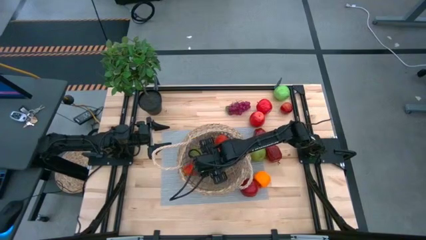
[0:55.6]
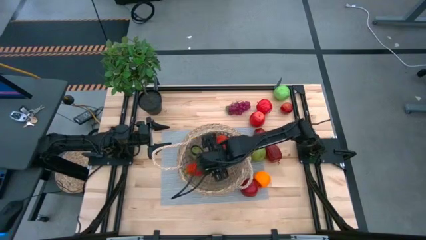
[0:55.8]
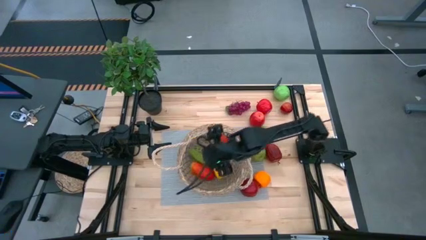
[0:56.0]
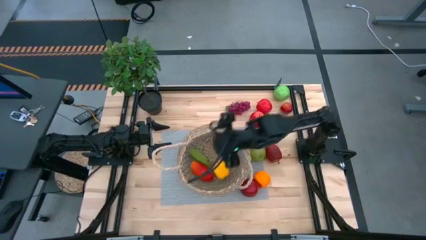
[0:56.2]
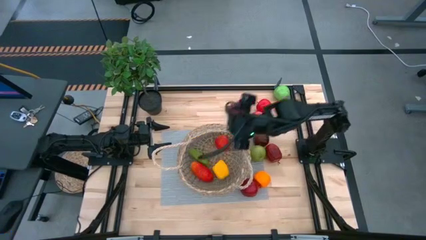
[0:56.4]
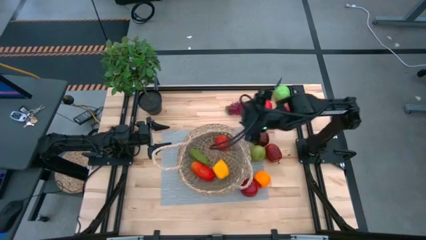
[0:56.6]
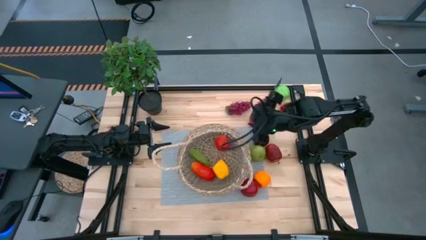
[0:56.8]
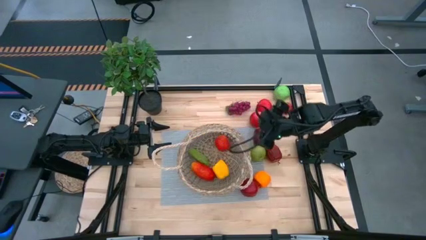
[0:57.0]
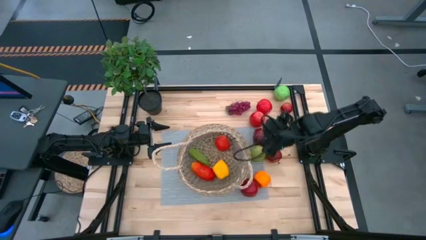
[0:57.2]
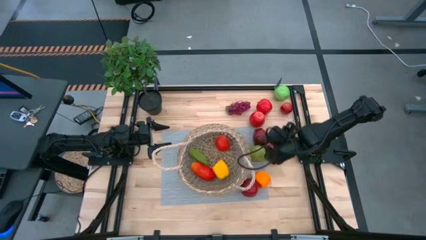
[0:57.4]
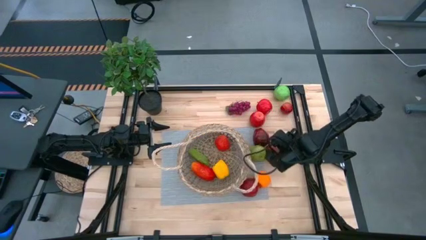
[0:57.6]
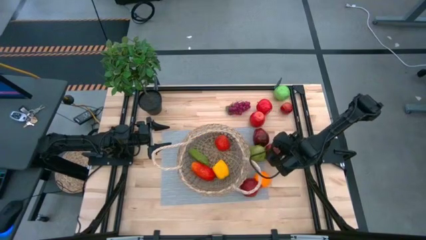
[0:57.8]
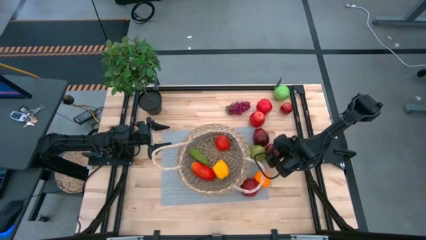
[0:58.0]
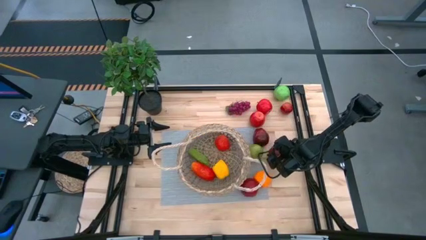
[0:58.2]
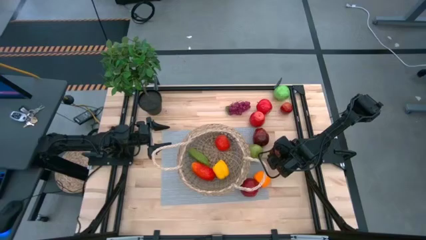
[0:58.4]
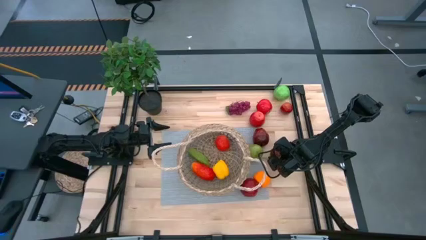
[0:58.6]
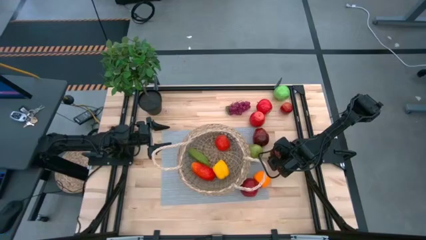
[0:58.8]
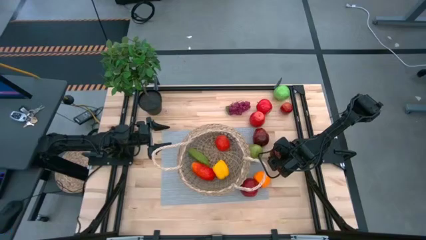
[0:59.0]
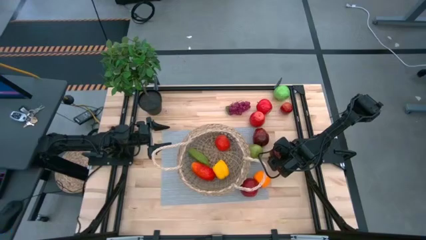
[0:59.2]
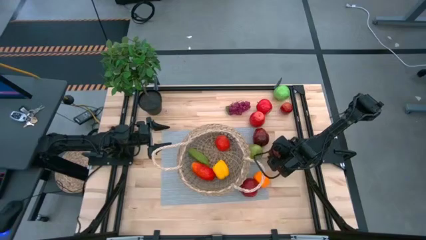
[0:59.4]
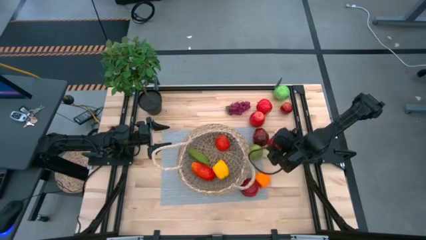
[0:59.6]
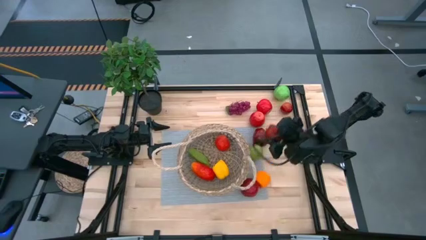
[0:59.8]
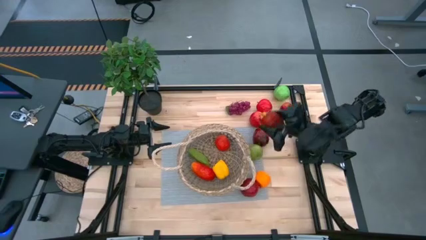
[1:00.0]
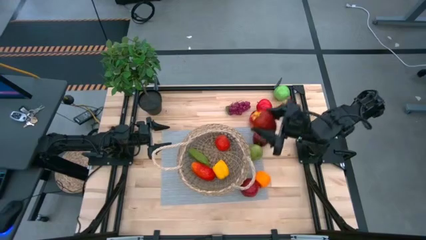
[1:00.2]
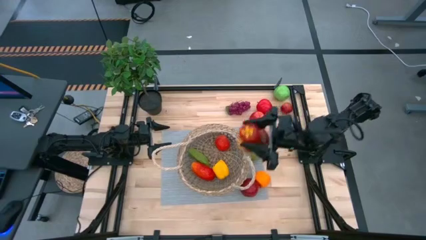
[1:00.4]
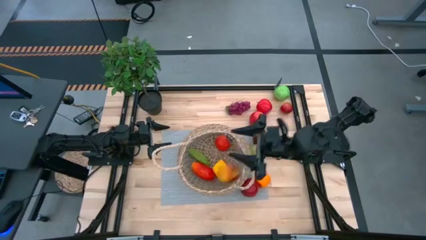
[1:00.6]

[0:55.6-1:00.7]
Task: Build produce basket
Put the bottom dark red apple into the basket

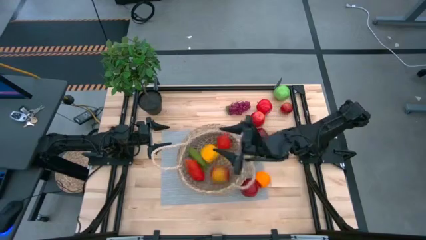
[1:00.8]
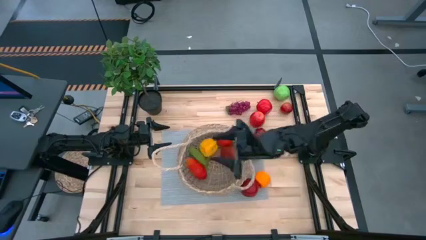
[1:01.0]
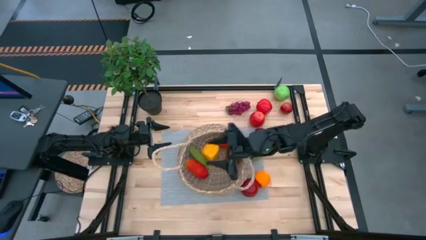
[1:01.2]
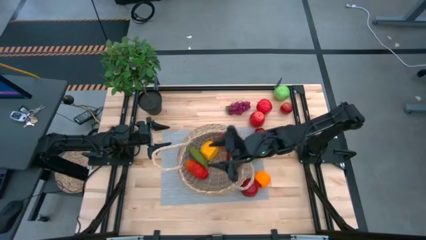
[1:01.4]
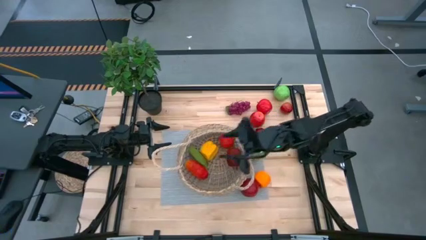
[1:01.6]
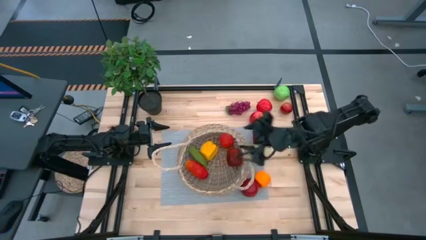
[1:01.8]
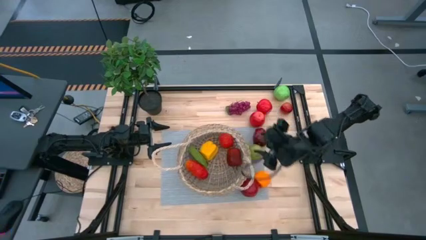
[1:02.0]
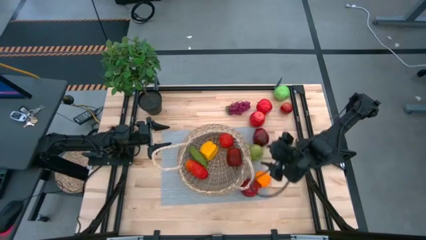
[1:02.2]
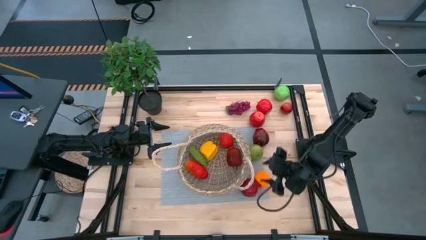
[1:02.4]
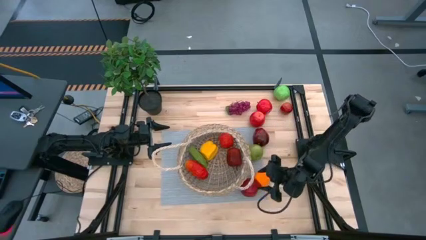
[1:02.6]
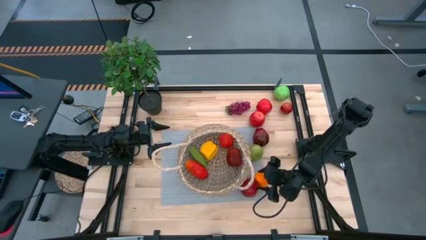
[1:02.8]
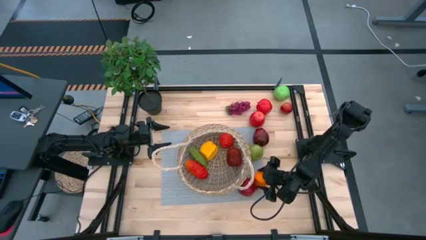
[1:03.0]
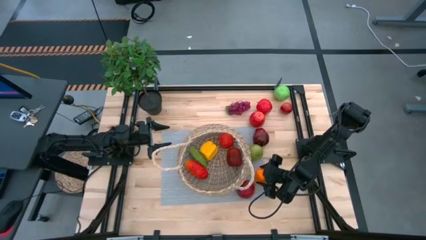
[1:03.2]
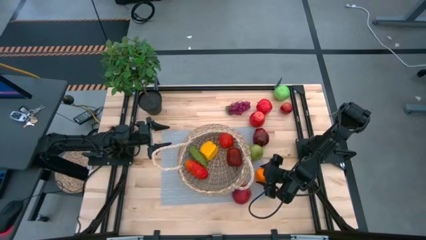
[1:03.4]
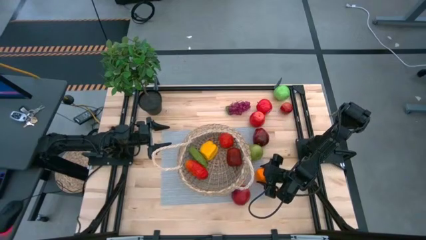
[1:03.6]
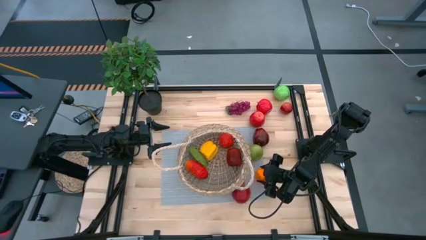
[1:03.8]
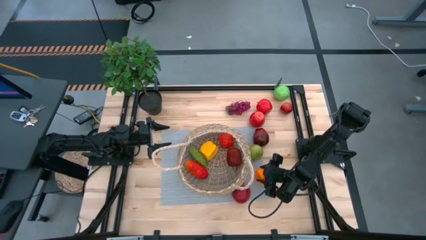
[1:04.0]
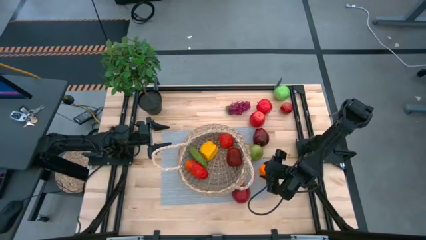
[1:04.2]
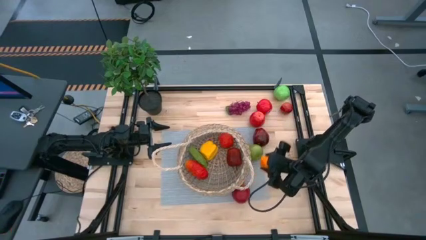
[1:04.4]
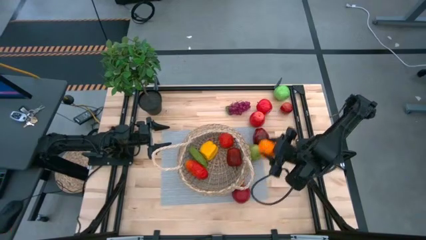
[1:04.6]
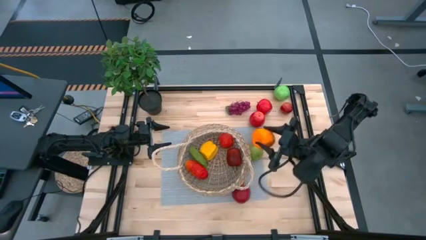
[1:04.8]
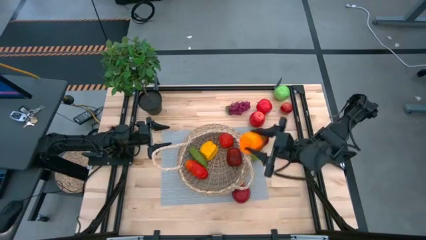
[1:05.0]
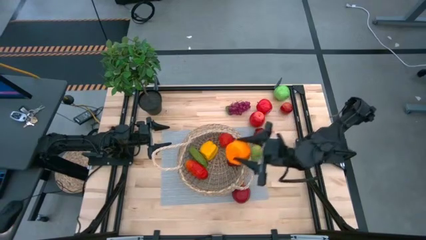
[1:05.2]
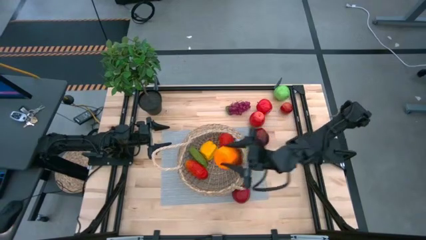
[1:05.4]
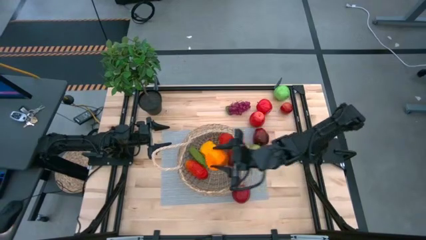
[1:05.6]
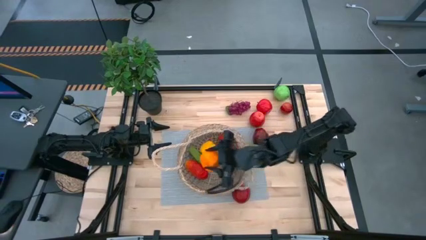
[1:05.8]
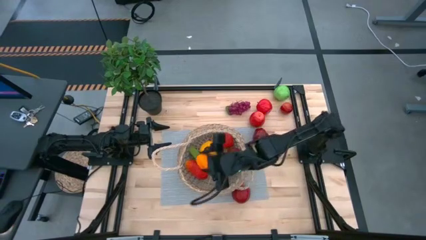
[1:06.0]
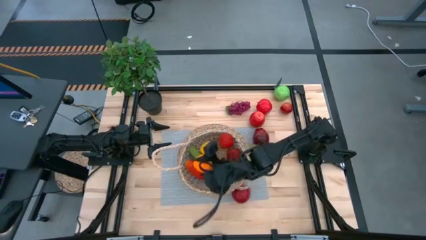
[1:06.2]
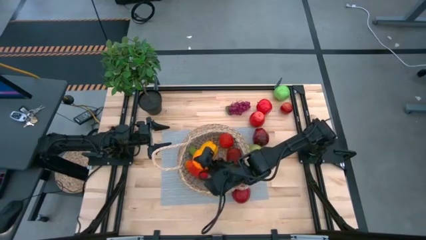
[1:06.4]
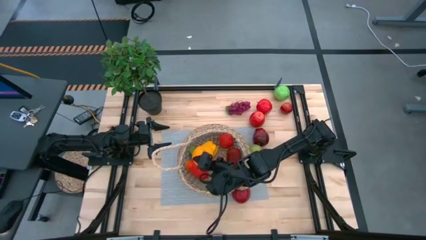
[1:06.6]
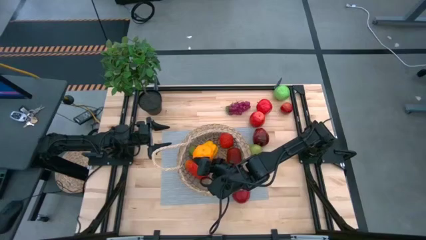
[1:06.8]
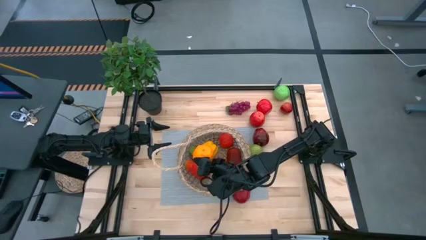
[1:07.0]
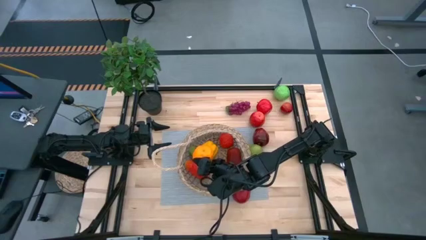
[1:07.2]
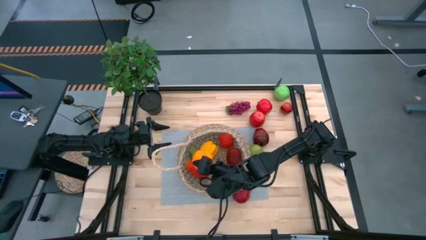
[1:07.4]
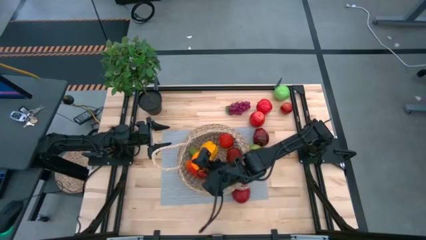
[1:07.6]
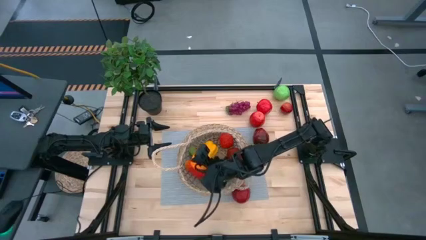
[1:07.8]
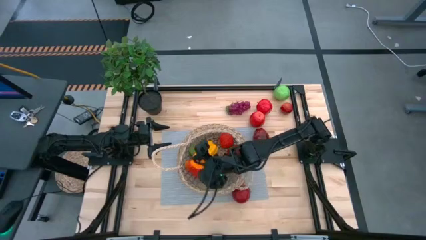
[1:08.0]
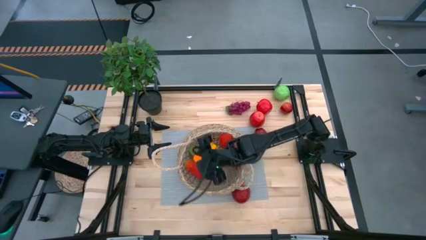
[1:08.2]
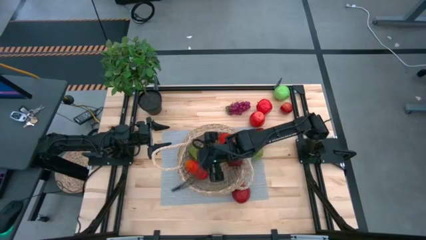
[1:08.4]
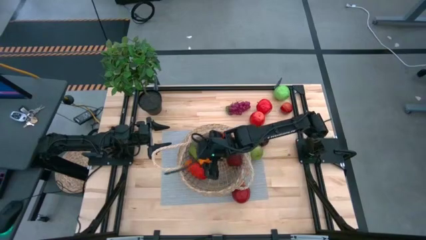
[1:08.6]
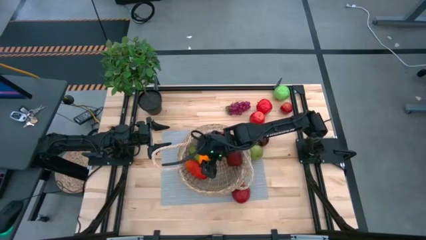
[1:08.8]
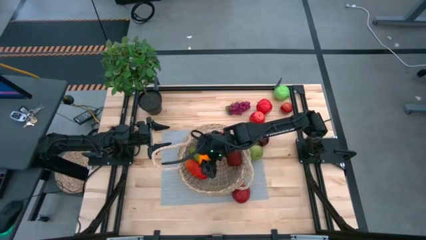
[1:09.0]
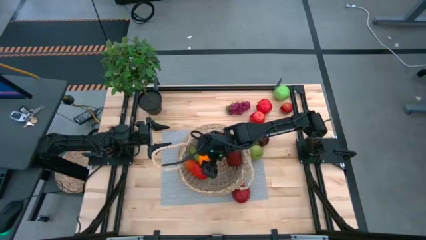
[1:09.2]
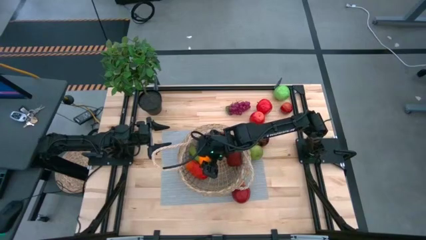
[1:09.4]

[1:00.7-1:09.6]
Put the orange into the basket

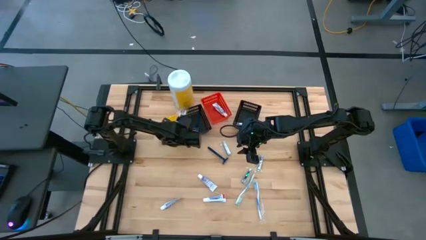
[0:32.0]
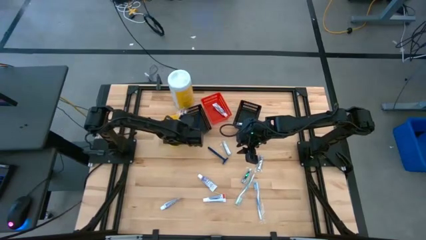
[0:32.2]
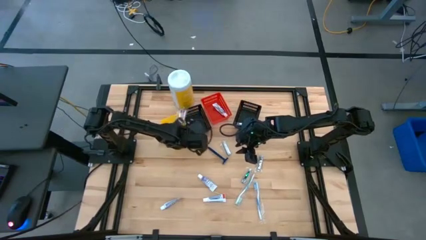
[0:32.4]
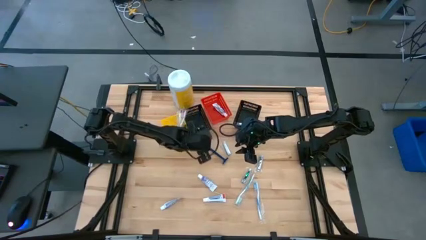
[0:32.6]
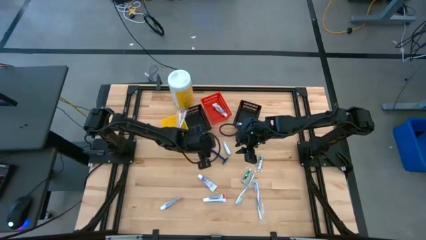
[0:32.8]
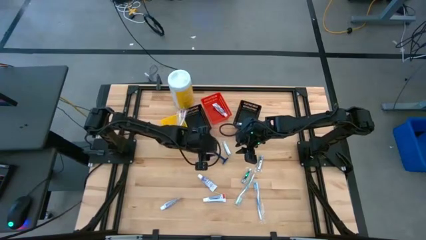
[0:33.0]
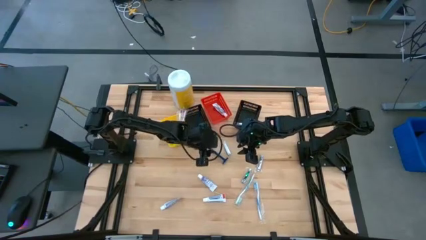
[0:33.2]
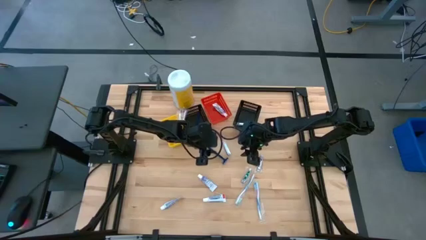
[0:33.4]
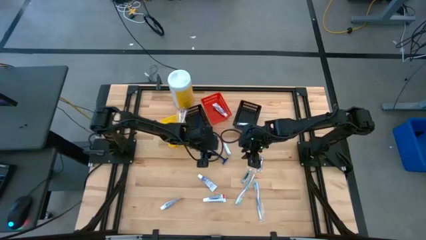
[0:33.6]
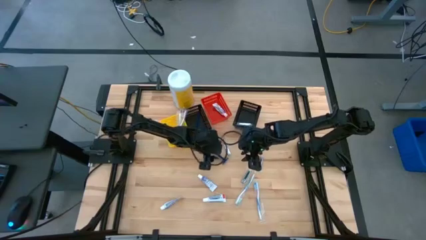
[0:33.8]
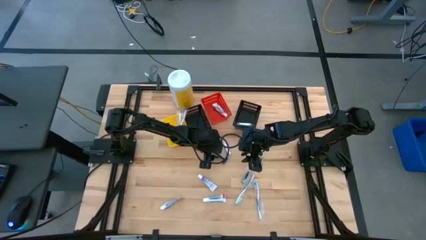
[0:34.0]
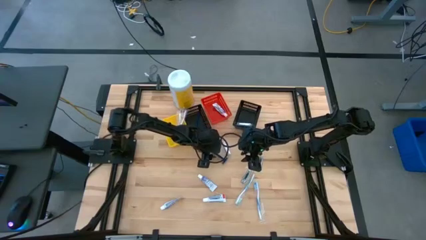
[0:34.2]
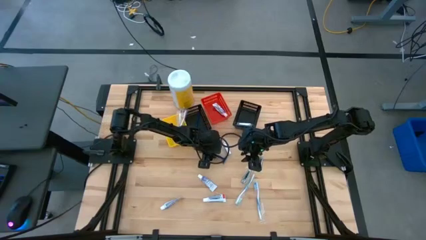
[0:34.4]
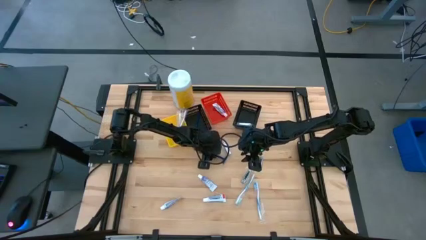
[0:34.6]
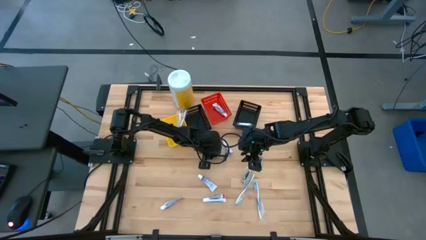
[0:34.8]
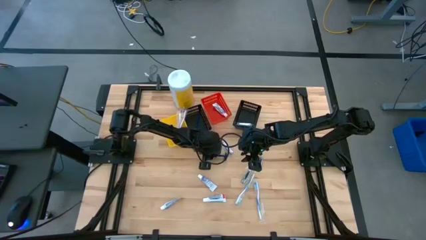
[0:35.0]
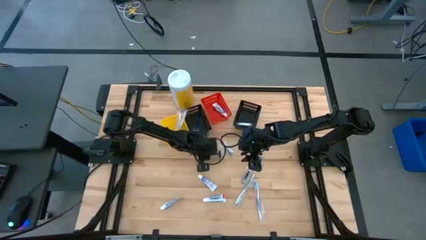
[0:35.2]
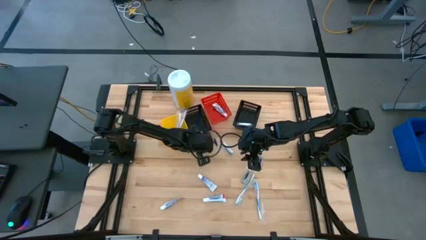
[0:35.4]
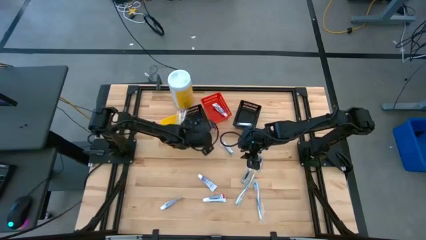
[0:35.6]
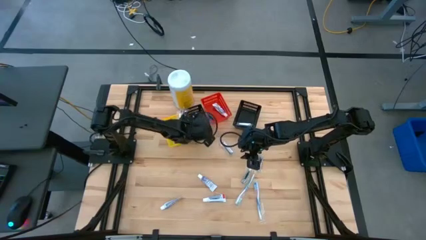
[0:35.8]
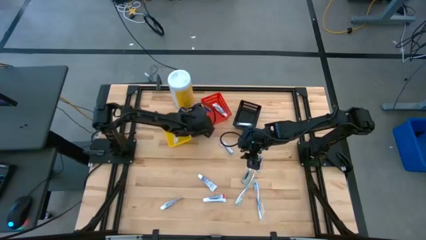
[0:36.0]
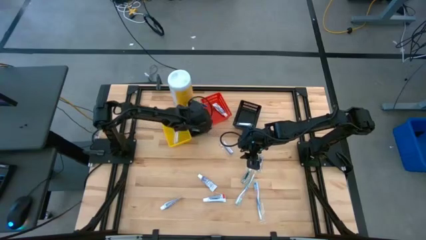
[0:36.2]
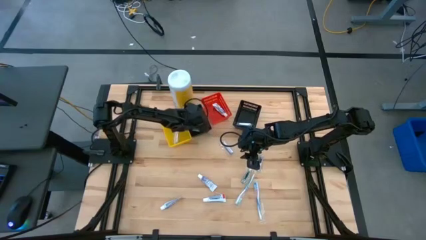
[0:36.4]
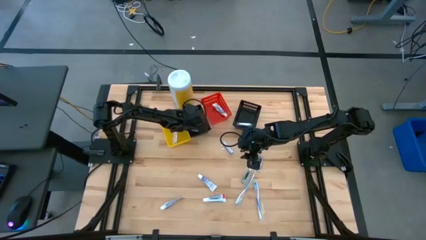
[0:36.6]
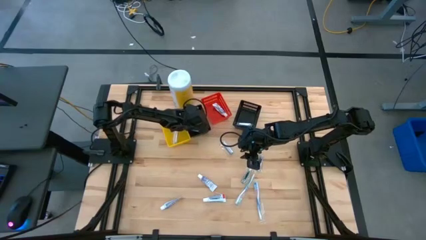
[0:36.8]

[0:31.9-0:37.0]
Task: Pick & Place Travel size toiletries
Put the blue razor into the left black bin
